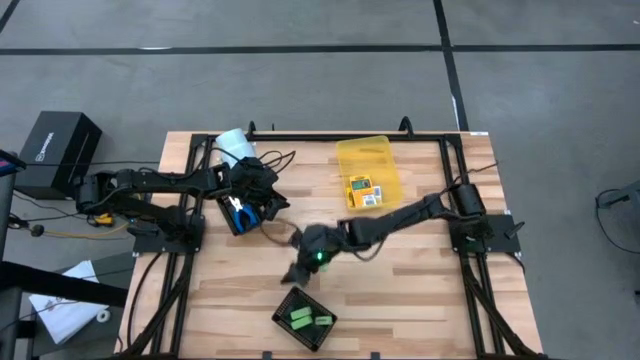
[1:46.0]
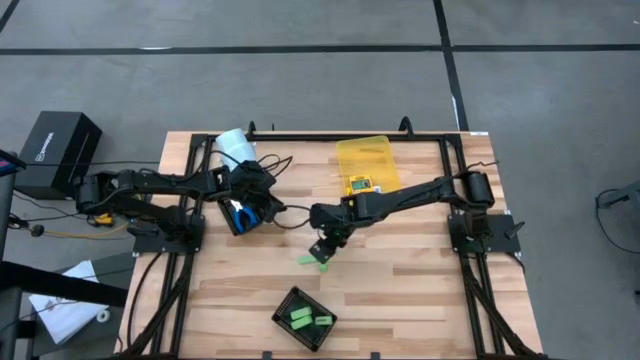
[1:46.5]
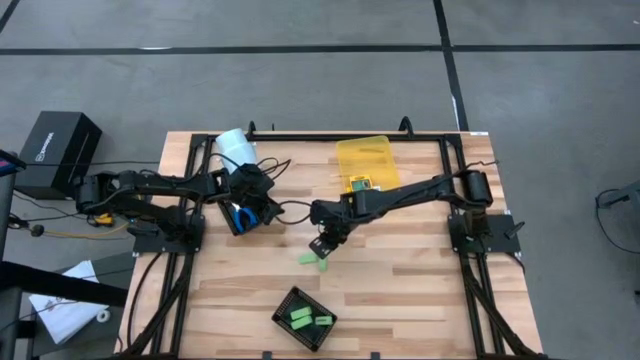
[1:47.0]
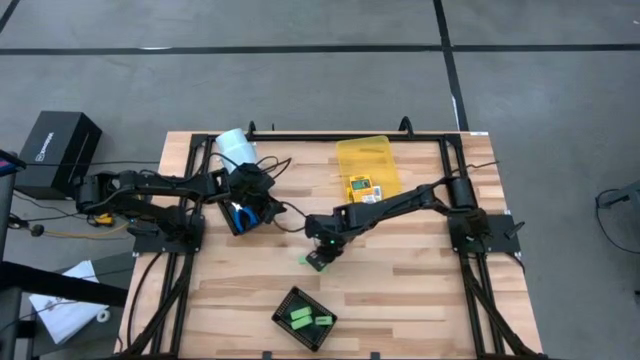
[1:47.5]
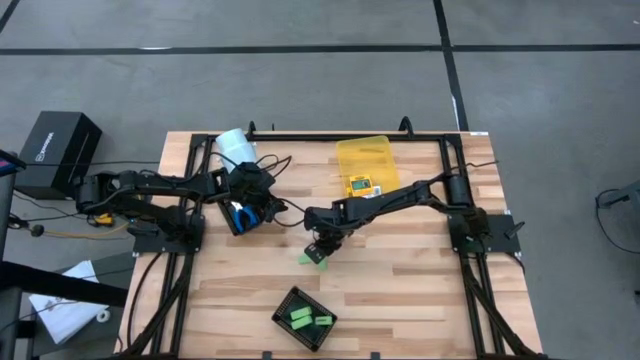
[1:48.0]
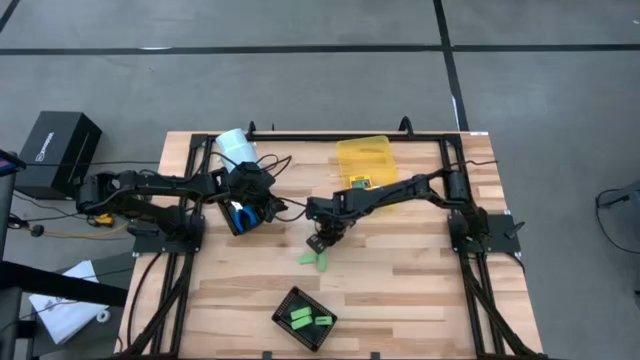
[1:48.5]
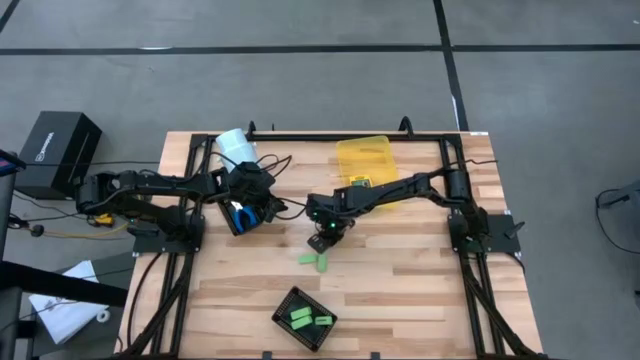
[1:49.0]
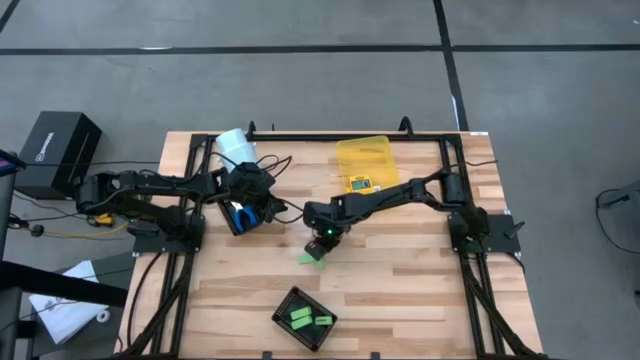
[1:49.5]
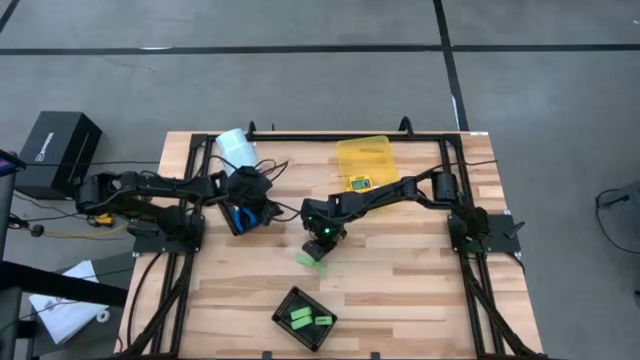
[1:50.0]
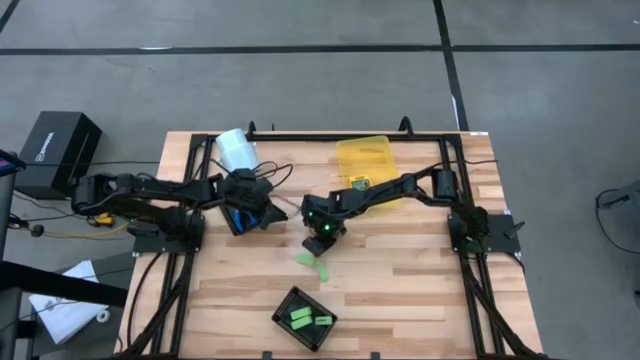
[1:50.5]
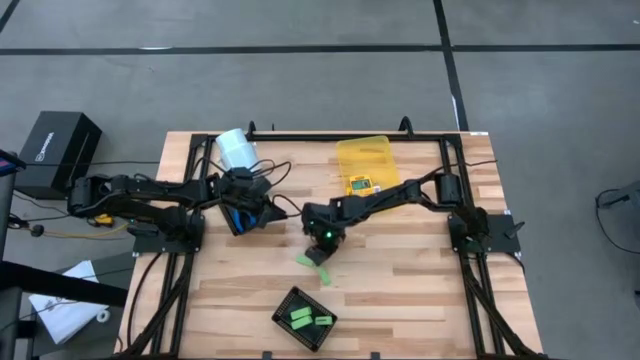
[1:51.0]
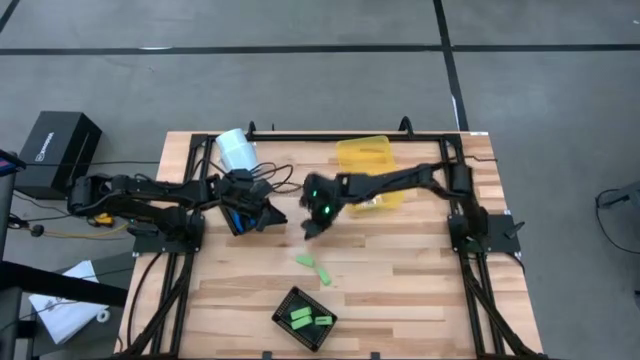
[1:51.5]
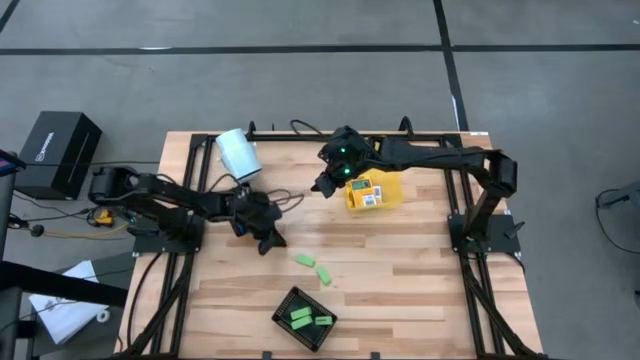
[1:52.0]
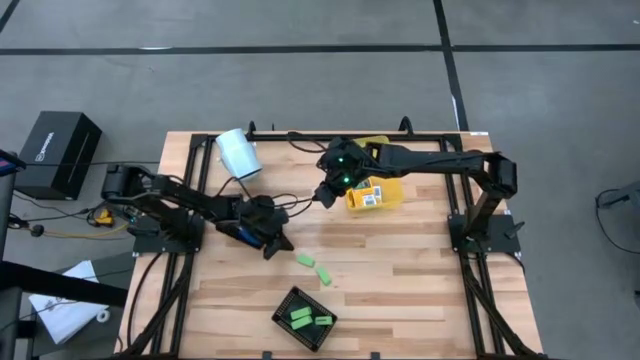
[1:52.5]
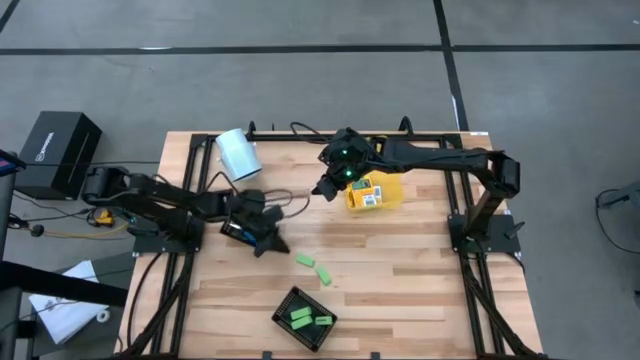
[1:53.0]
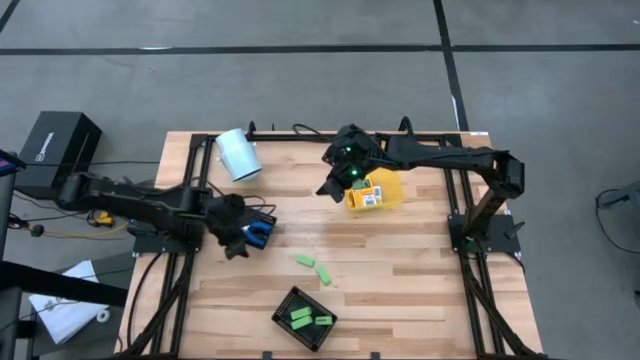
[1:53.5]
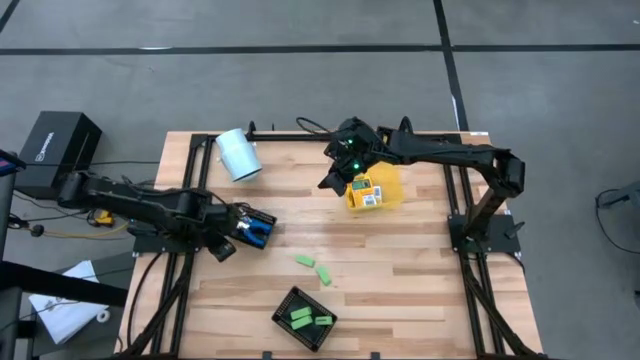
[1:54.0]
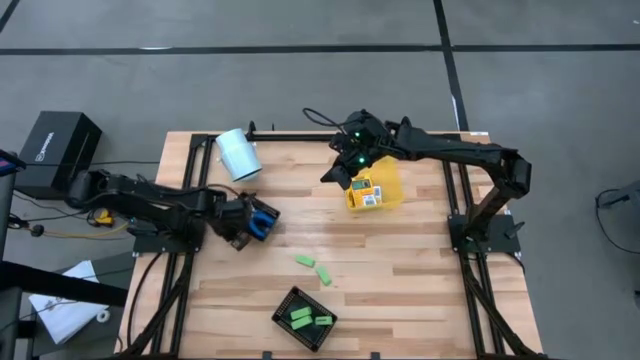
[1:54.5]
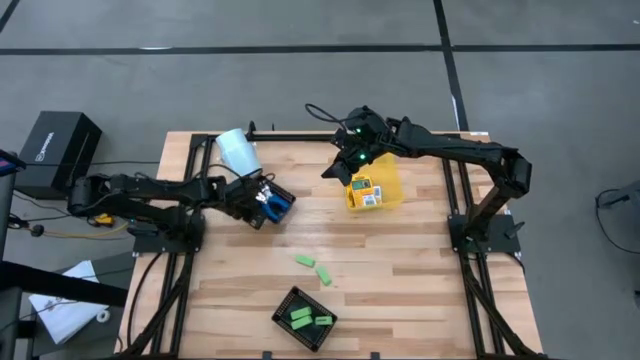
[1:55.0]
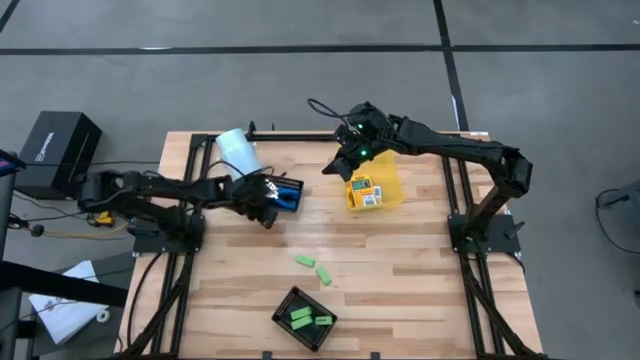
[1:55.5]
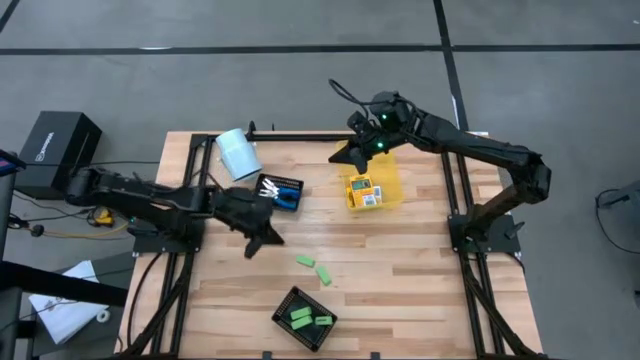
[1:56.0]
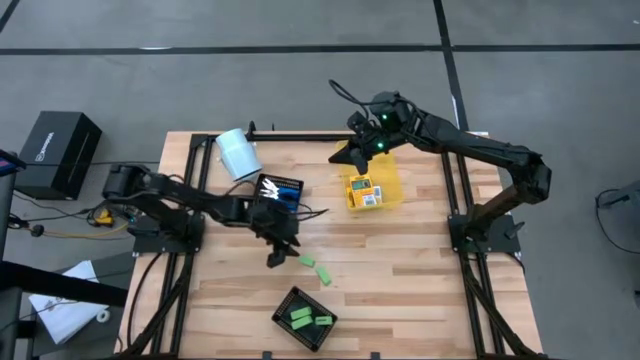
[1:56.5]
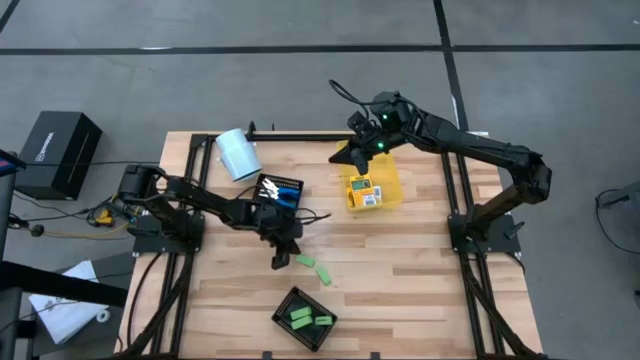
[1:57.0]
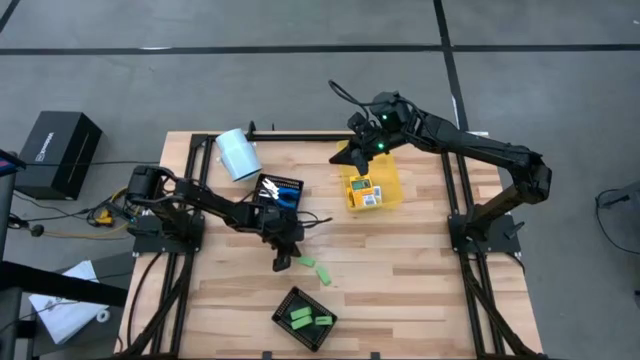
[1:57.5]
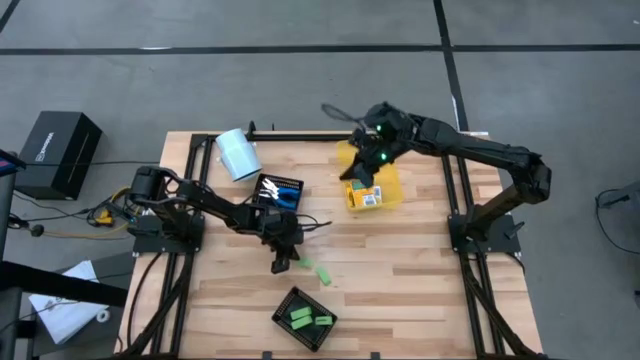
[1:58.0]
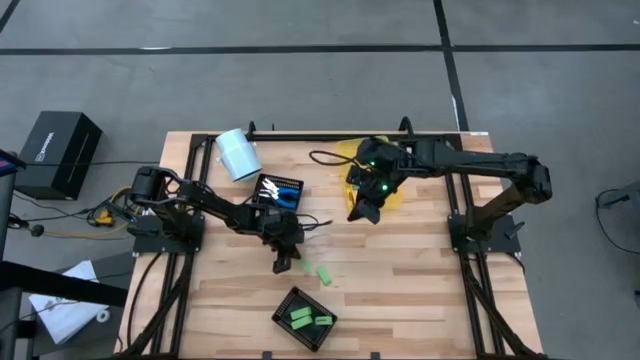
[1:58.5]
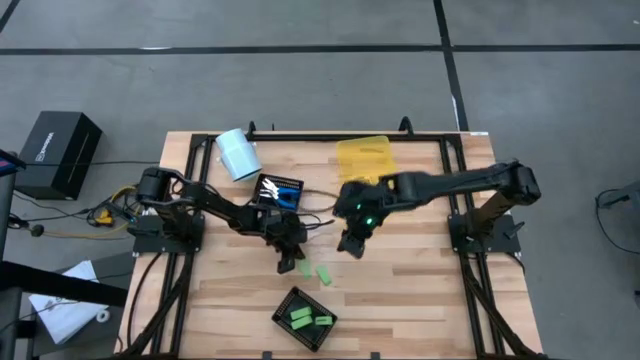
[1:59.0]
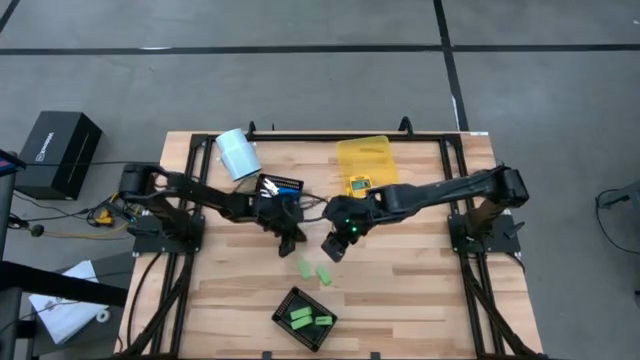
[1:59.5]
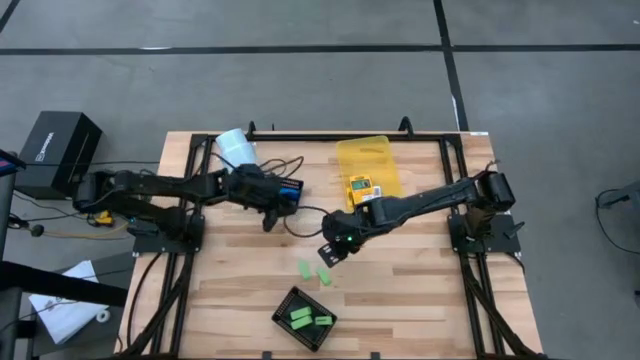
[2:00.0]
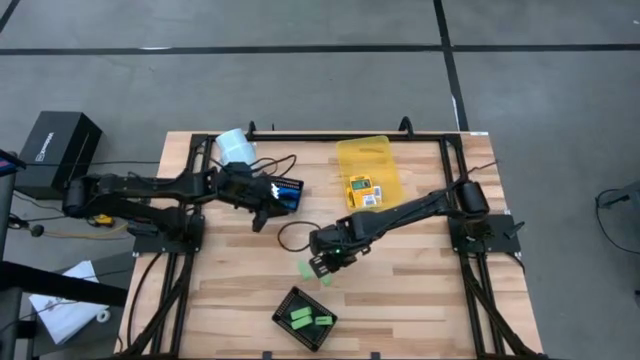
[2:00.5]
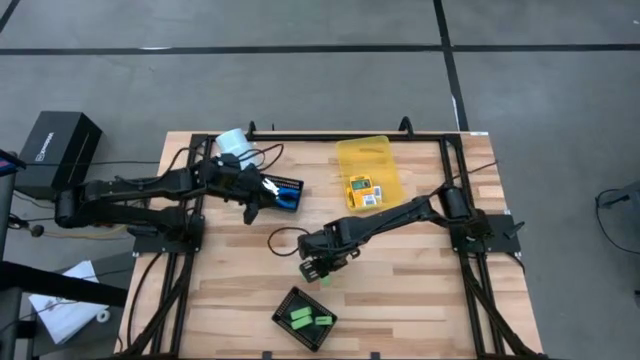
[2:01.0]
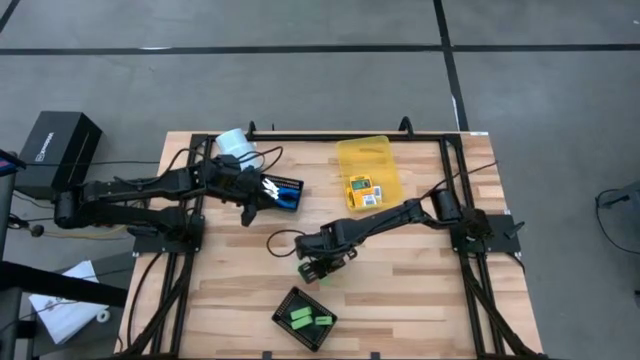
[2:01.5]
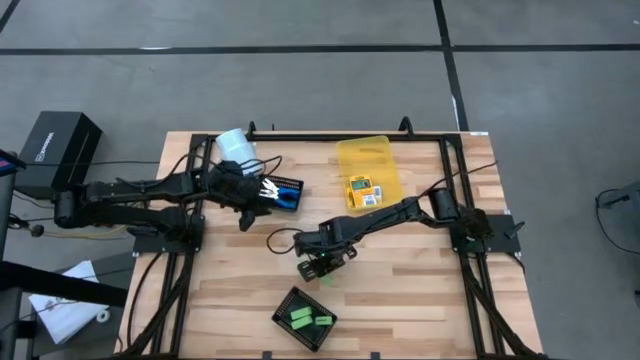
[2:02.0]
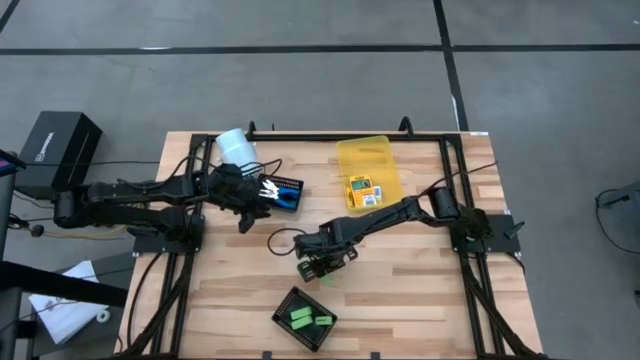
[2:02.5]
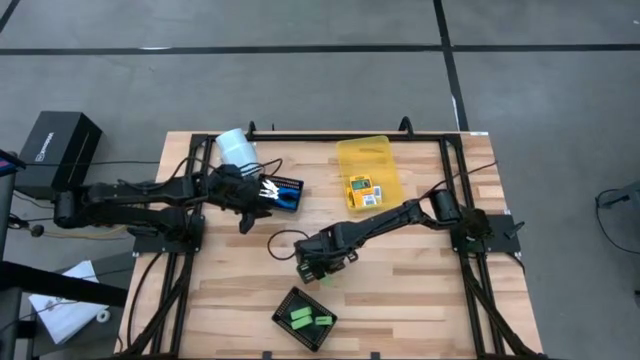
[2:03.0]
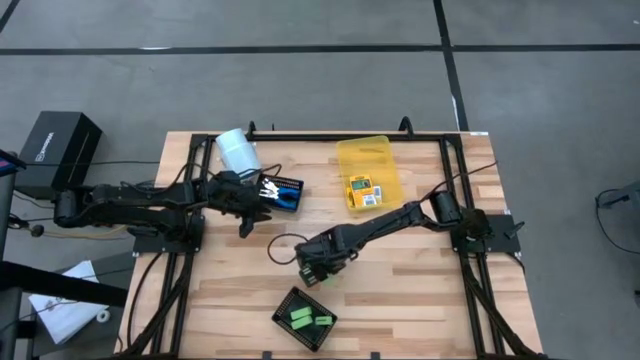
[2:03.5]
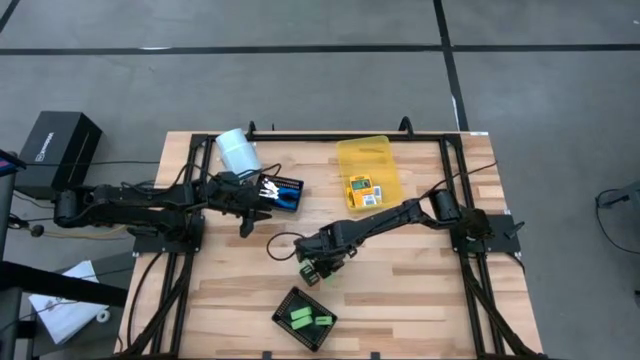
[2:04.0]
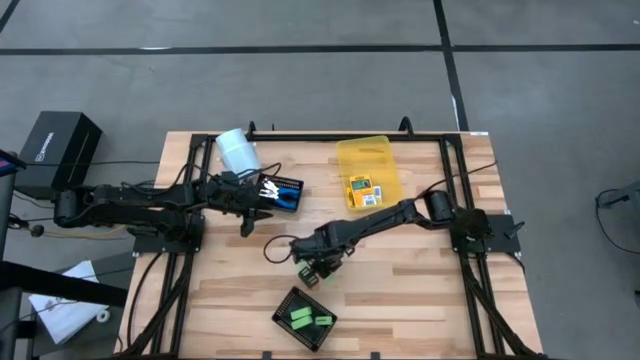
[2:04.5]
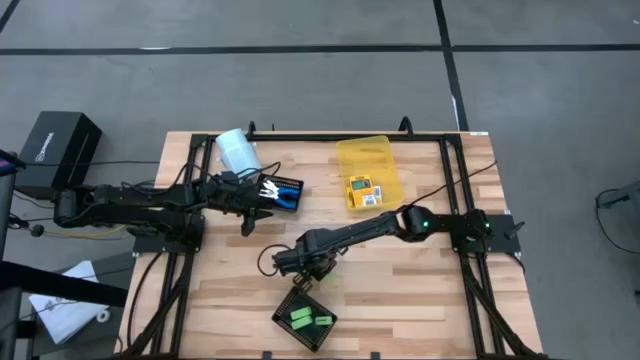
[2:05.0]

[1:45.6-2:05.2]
Task: Pick & Place School Supplies
Put the green eraser into the bottom black bin
